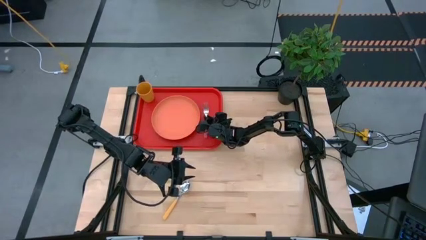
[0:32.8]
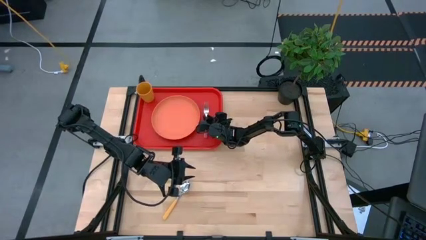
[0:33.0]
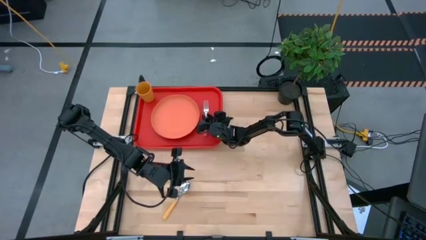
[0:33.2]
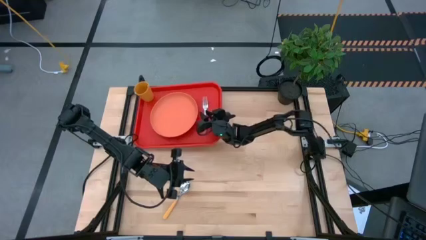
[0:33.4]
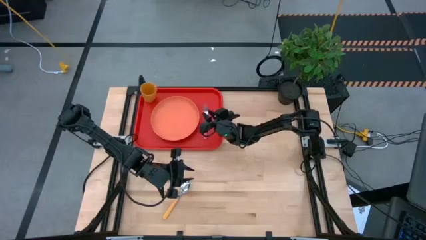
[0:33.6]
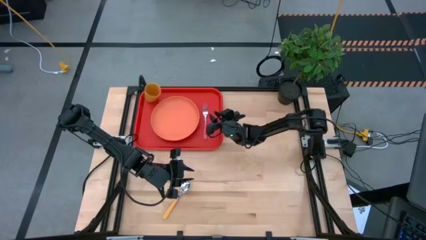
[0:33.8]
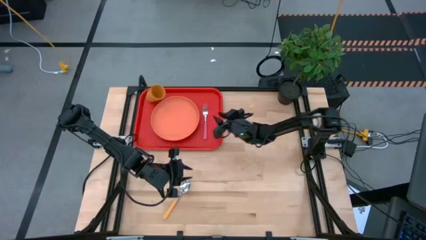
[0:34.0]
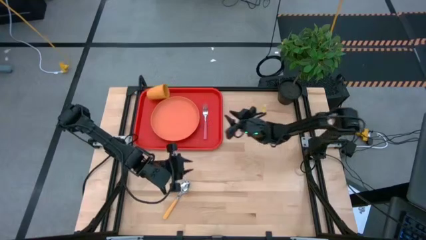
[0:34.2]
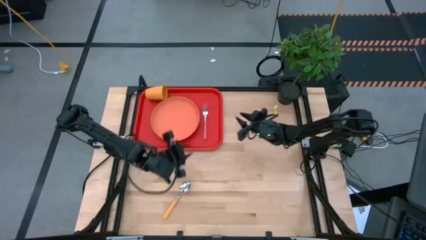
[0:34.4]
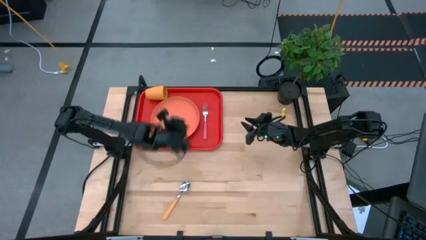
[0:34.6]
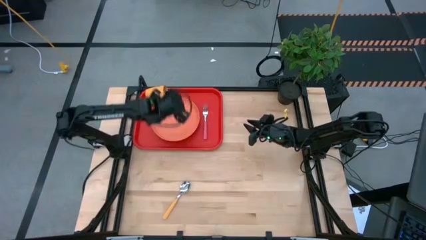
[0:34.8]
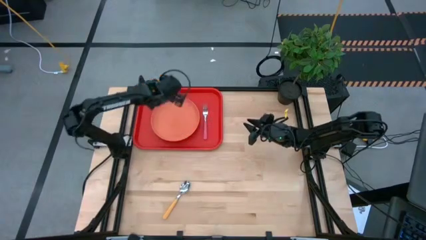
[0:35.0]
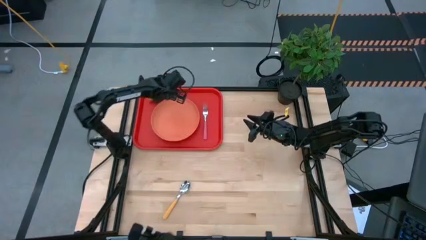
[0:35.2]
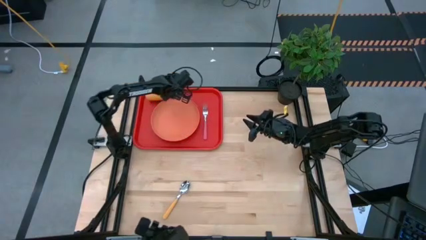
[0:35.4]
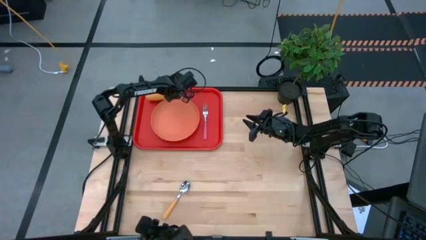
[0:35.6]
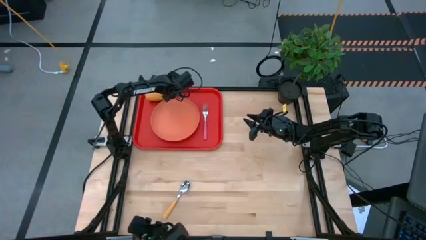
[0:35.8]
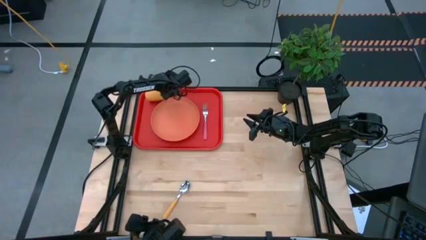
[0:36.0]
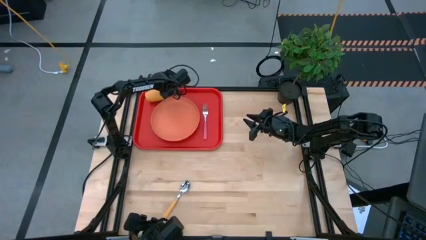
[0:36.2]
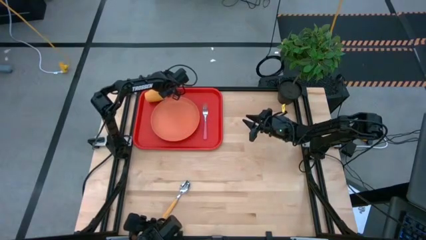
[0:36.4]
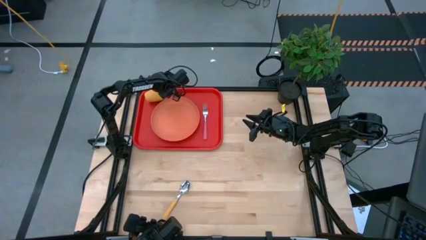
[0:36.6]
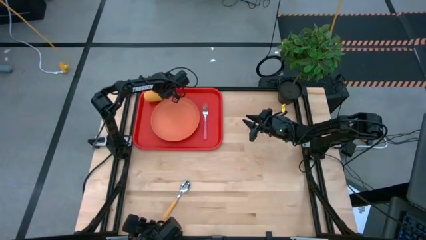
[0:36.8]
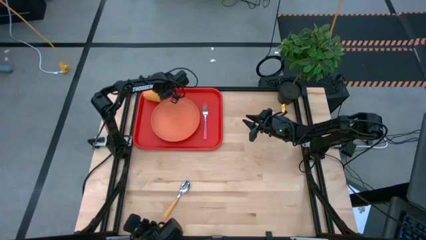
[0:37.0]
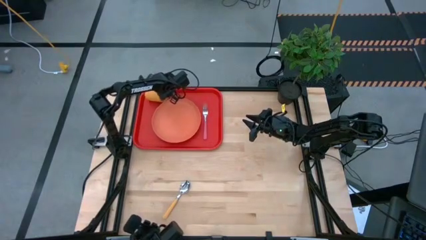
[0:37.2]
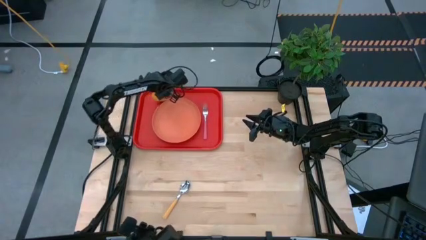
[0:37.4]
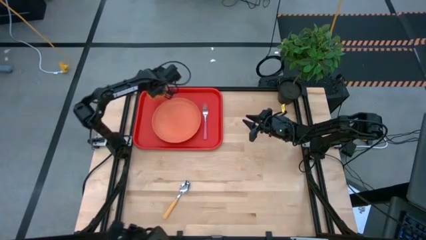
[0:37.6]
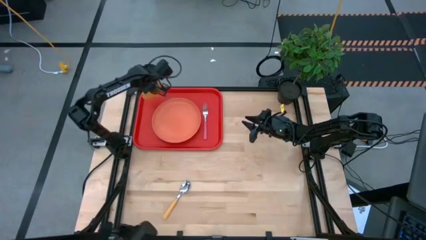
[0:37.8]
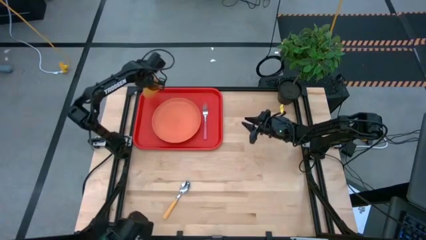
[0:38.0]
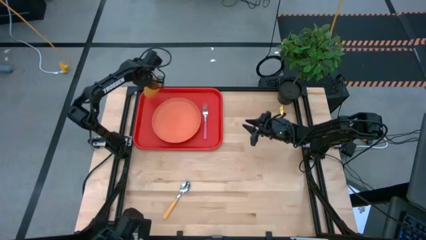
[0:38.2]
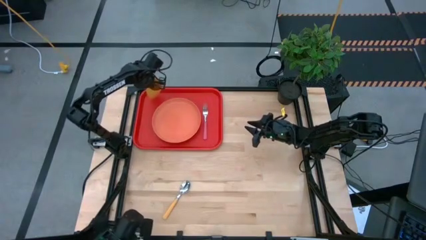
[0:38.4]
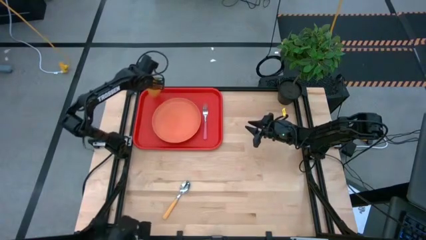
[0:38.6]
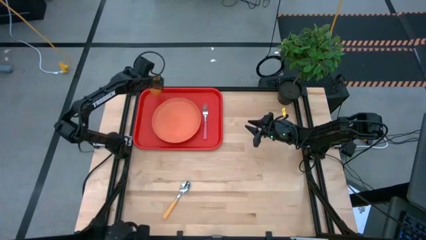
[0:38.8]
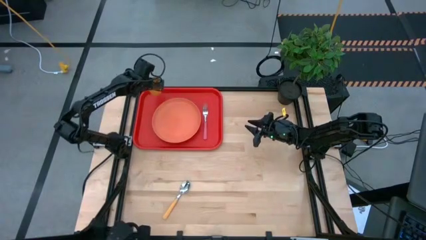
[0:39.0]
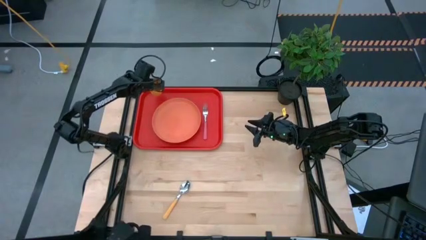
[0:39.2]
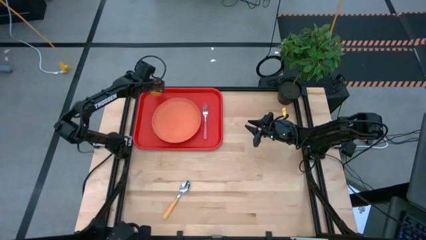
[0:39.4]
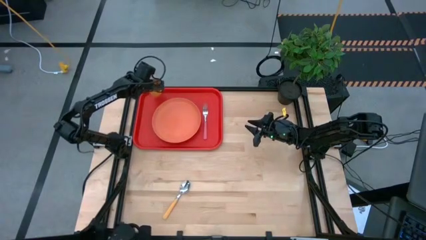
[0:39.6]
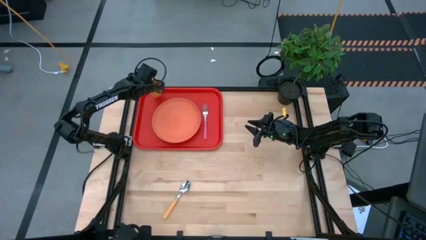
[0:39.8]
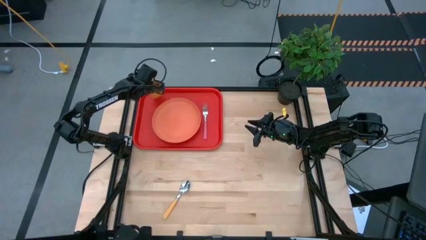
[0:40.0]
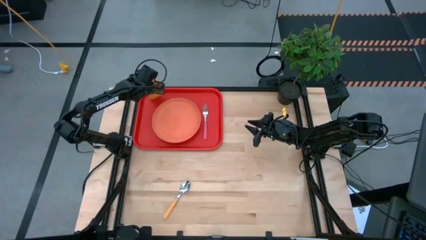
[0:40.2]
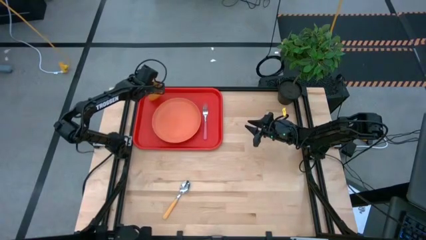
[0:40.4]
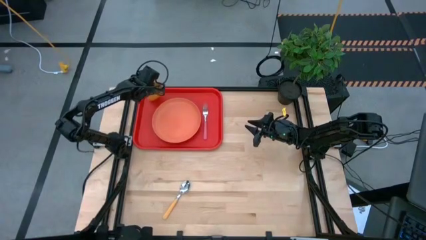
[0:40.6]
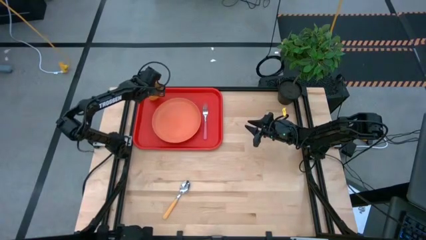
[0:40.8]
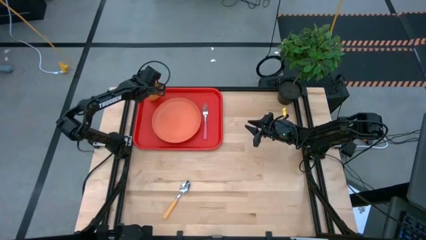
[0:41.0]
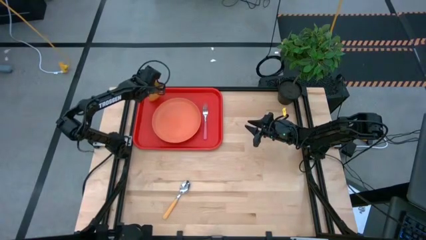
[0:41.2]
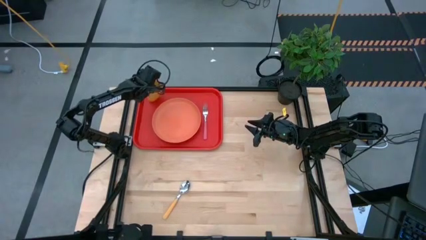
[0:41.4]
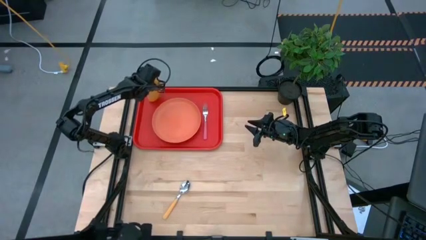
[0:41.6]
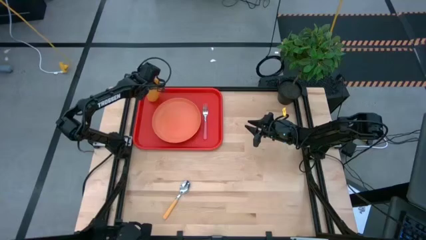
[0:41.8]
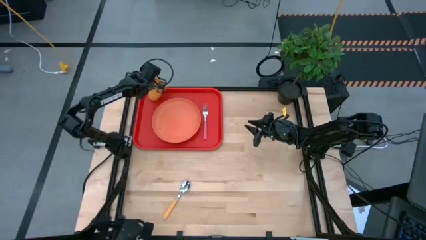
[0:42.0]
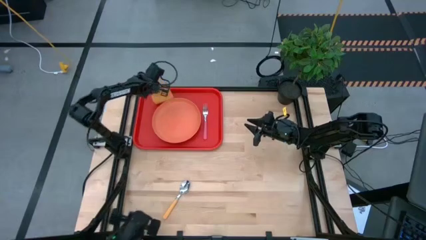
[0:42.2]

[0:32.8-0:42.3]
Task: Pick and place plate/cup/fork/spoon on tray
Adjust the yellow cup on the red serving tray

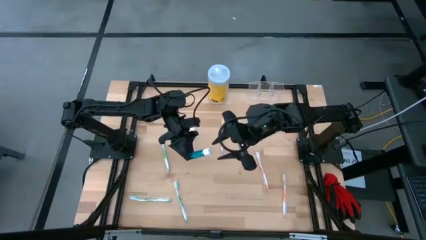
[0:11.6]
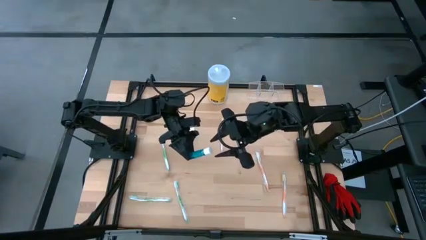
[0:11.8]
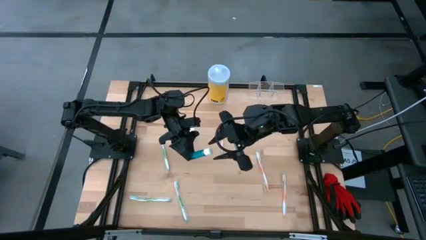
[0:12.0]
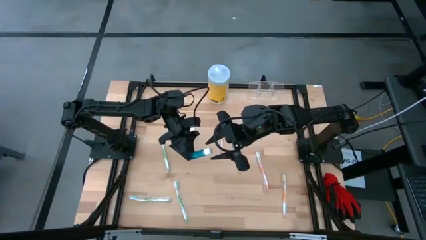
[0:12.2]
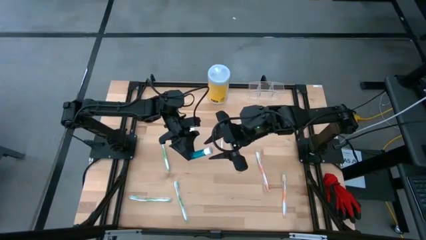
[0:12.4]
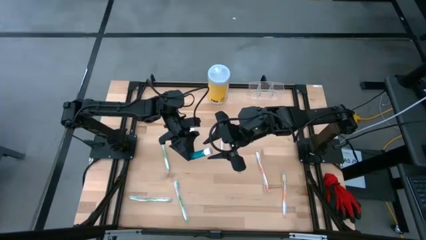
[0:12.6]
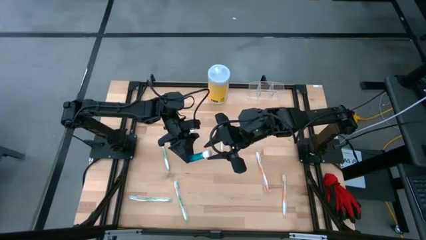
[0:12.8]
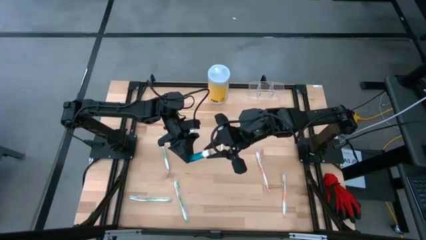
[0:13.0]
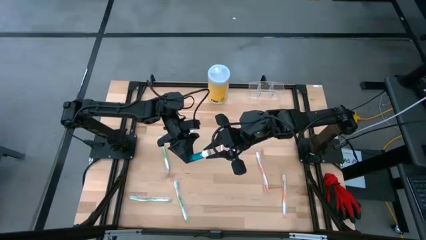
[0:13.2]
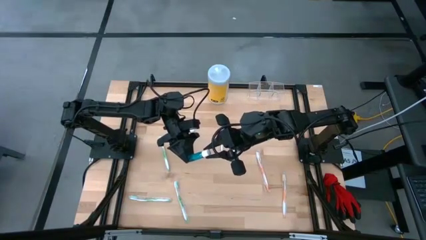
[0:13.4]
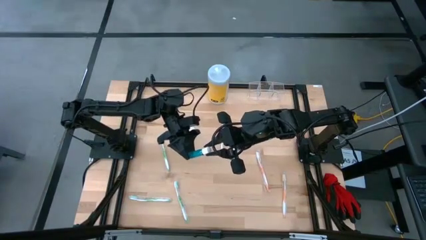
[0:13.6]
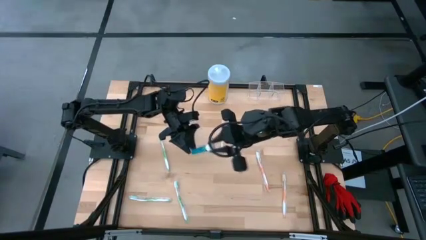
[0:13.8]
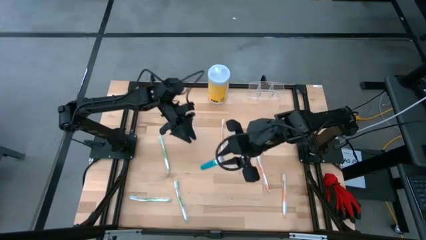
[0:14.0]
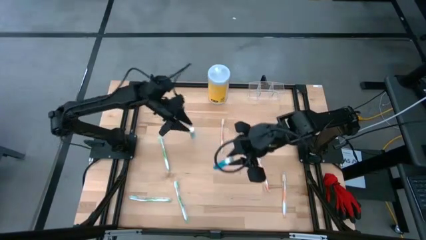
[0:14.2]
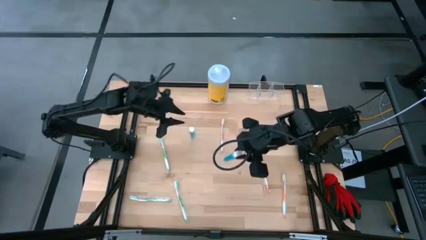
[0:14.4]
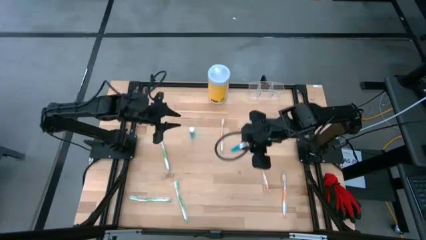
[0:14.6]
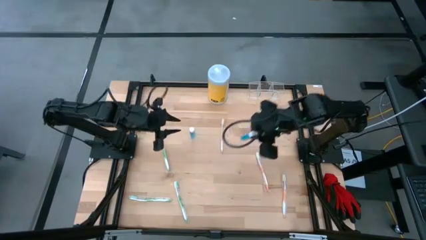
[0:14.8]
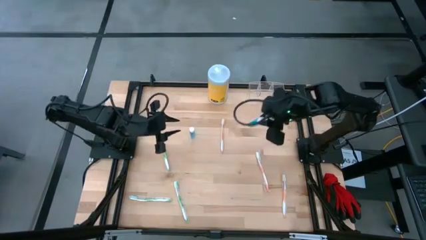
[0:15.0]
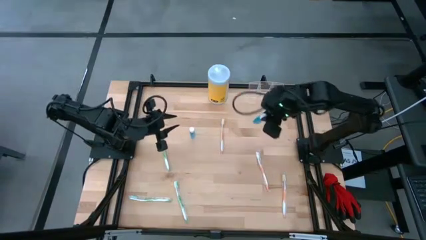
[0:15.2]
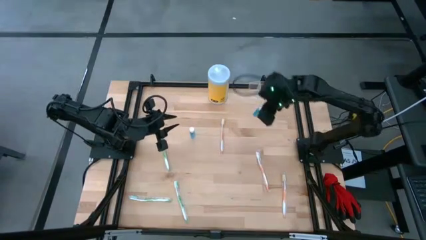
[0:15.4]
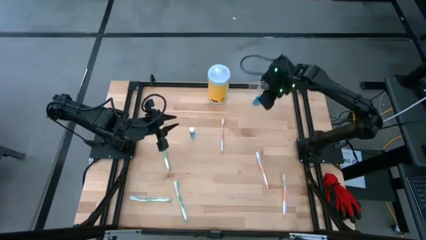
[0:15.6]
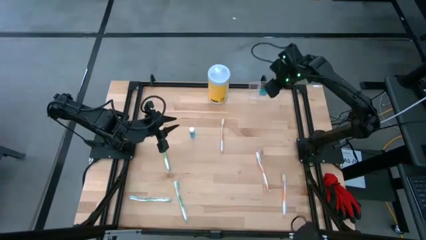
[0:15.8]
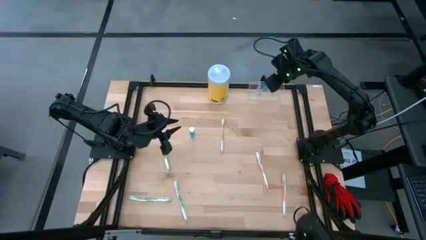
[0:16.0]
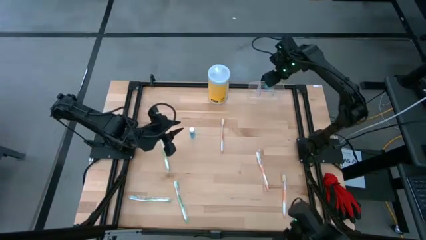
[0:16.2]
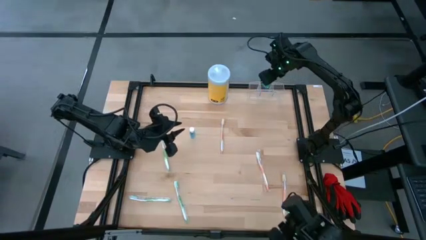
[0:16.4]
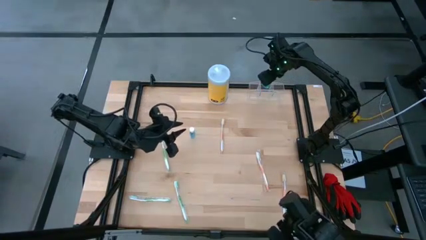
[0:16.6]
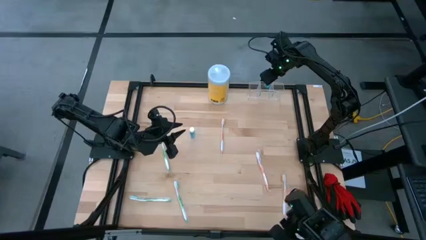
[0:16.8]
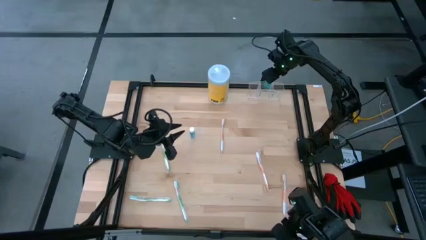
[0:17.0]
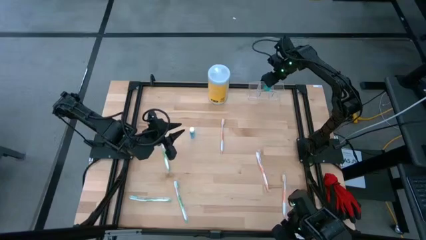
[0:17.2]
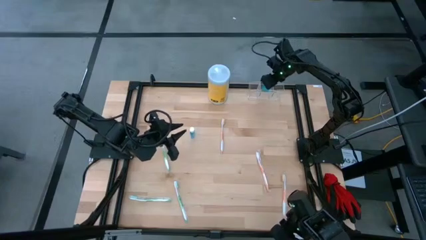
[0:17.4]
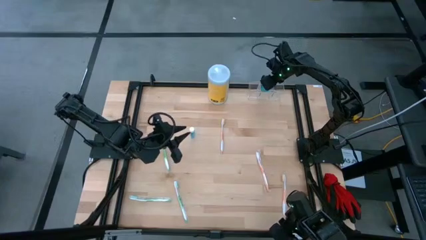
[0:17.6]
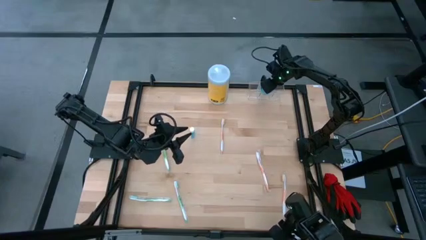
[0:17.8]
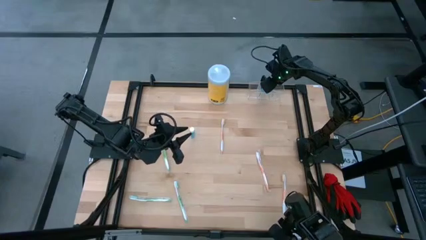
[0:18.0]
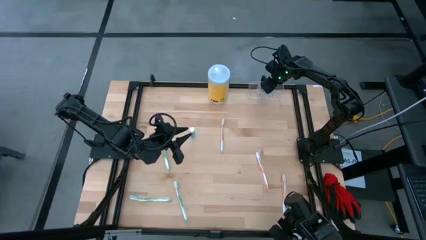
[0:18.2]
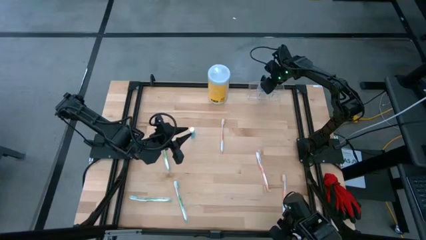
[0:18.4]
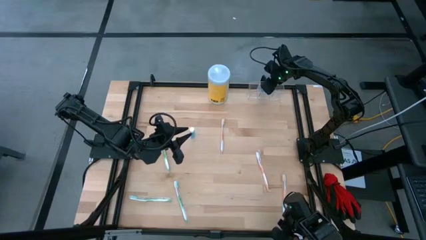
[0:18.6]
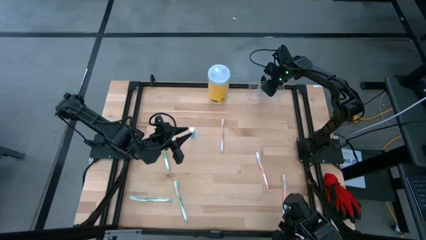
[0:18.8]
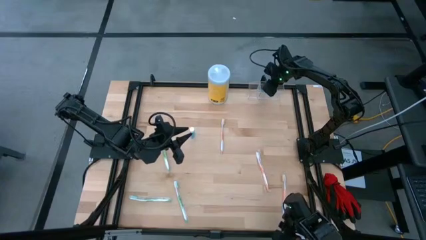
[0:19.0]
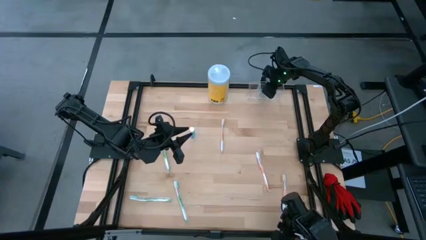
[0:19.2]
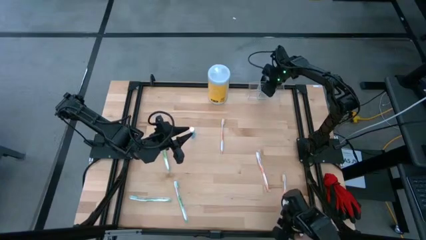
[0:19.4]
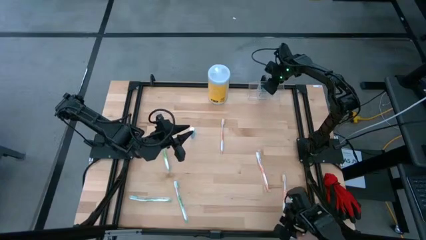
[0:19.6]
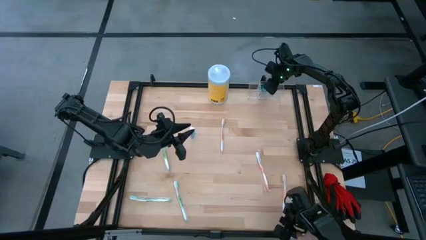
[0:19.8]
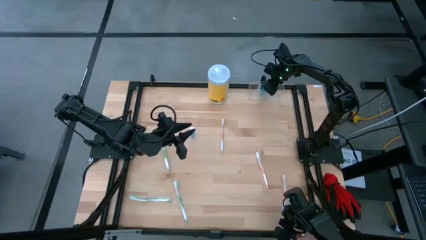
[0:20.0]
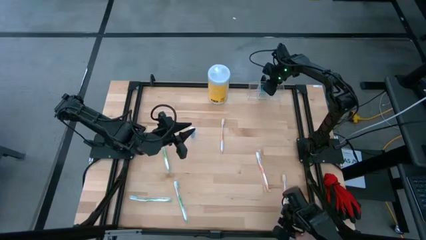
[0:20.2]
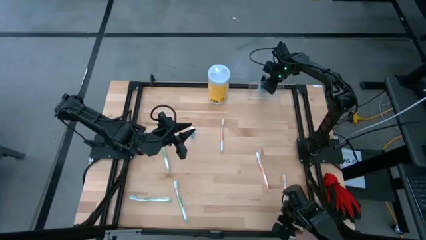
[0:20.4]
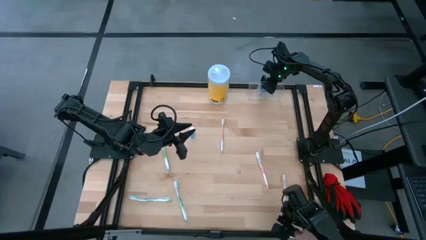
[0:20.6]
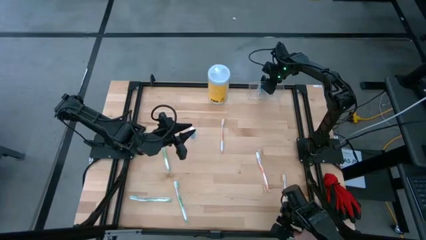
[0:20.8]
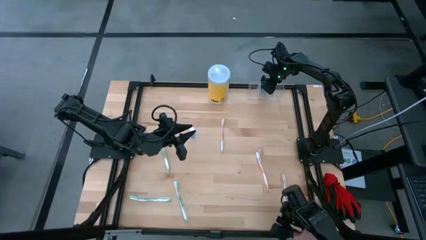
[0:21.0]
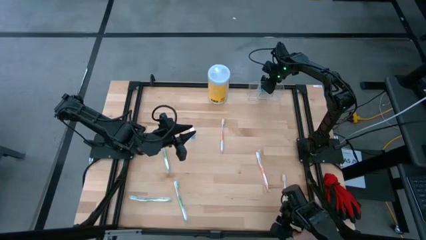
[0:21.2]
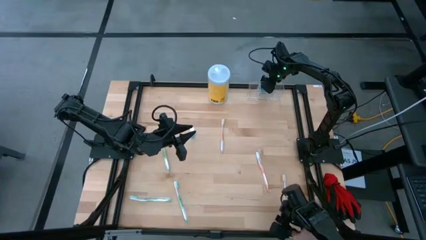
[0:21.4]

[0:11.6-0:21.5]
Task: Pick & Place toothbrushing station
Put the top blue mouthwash into the transparent organizer
